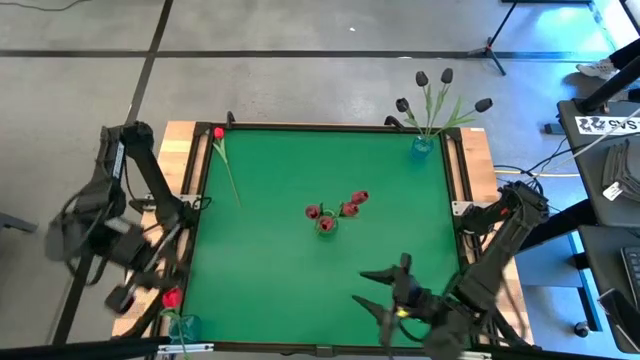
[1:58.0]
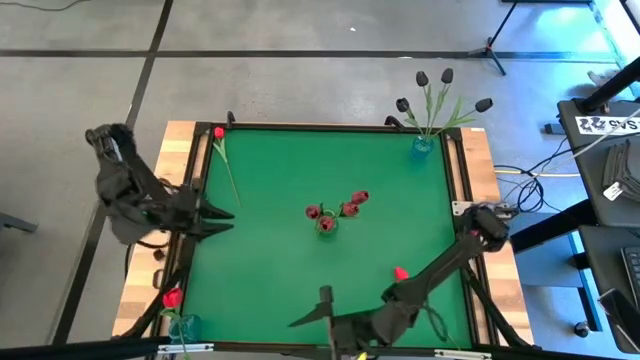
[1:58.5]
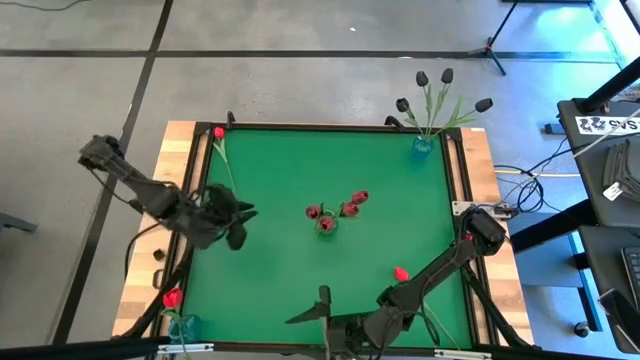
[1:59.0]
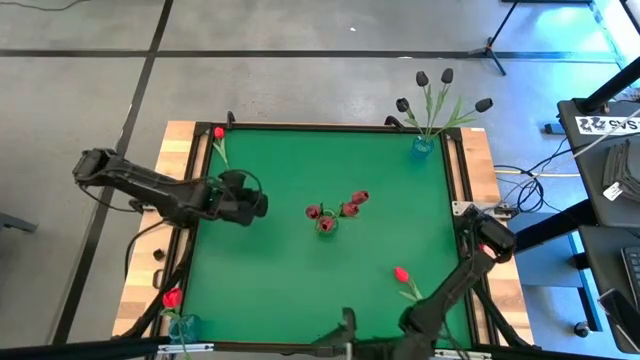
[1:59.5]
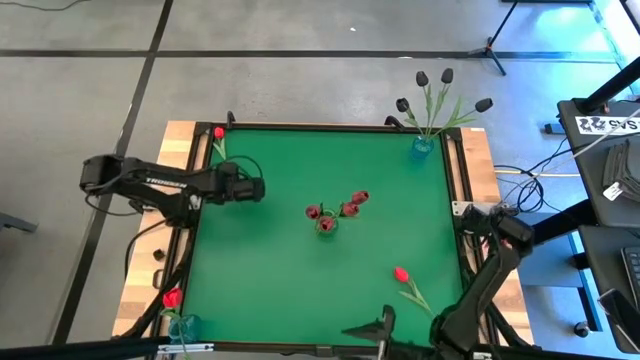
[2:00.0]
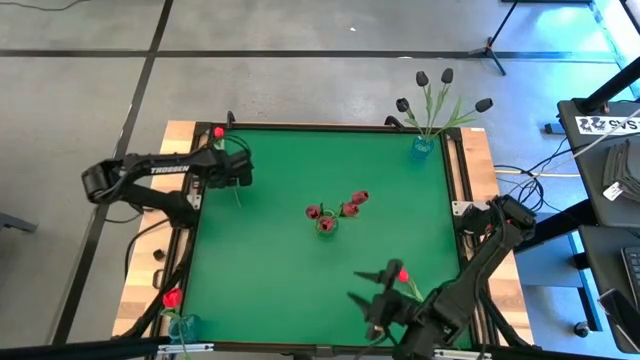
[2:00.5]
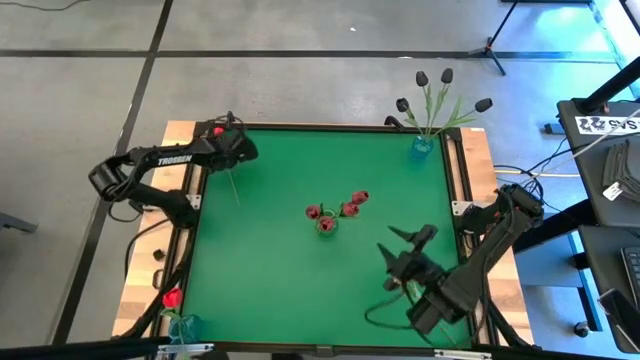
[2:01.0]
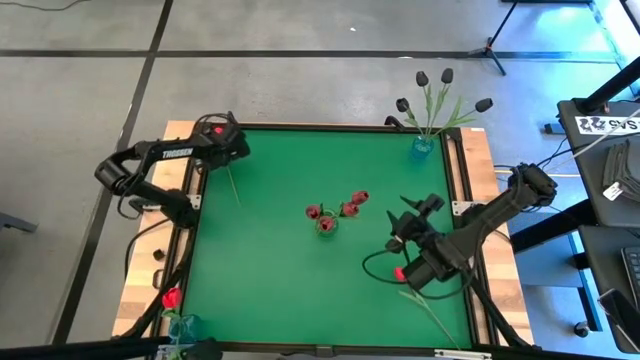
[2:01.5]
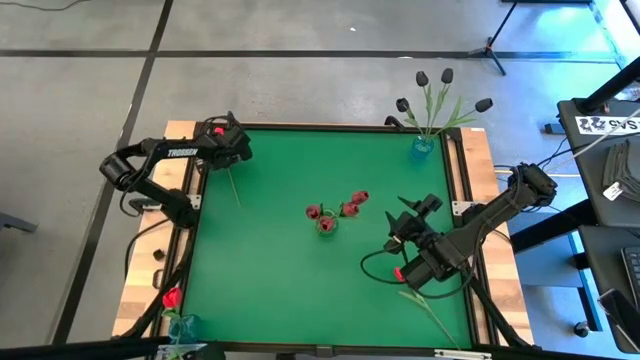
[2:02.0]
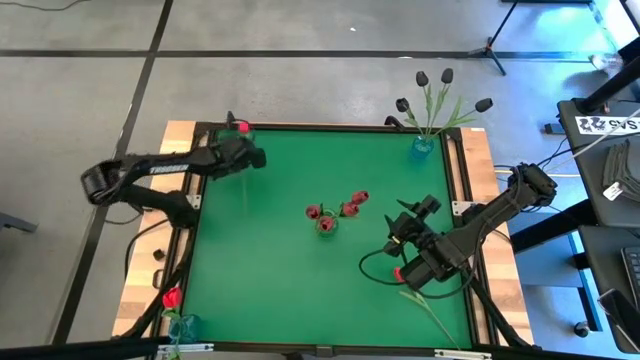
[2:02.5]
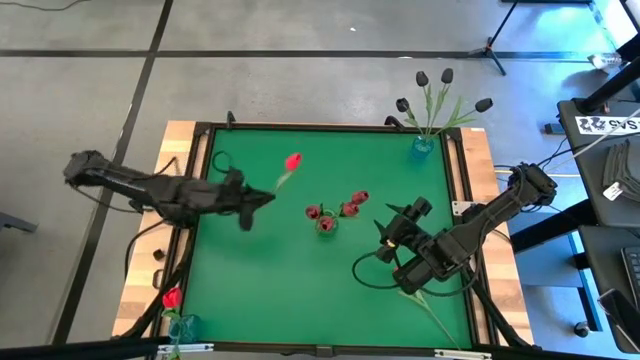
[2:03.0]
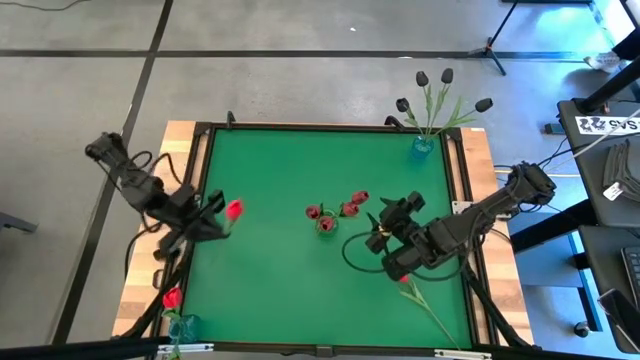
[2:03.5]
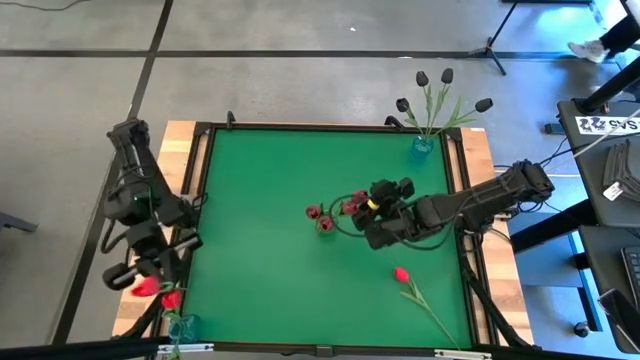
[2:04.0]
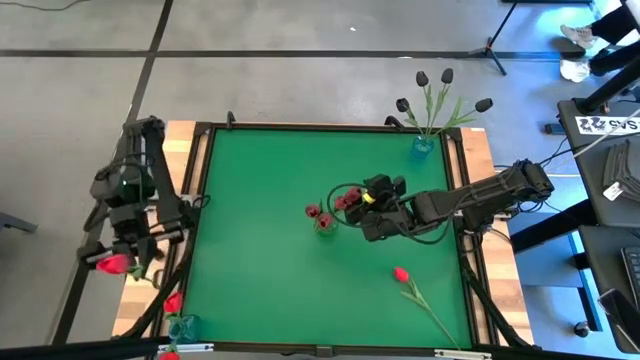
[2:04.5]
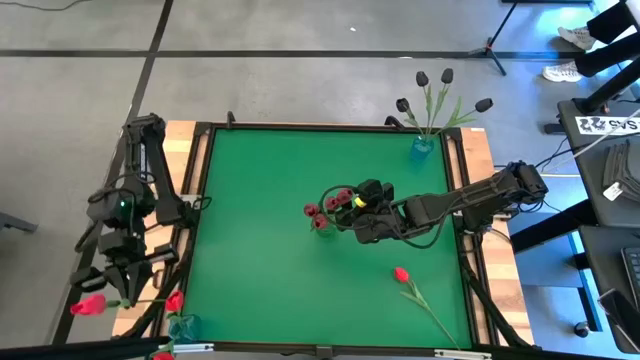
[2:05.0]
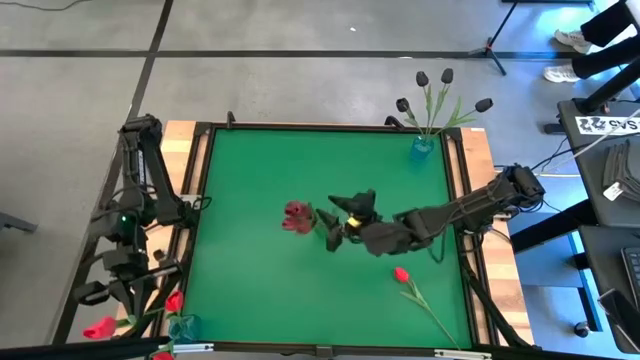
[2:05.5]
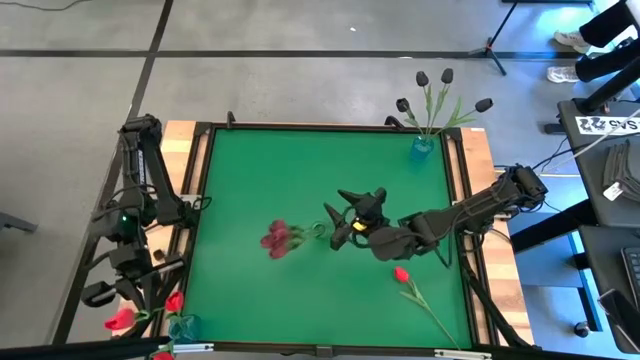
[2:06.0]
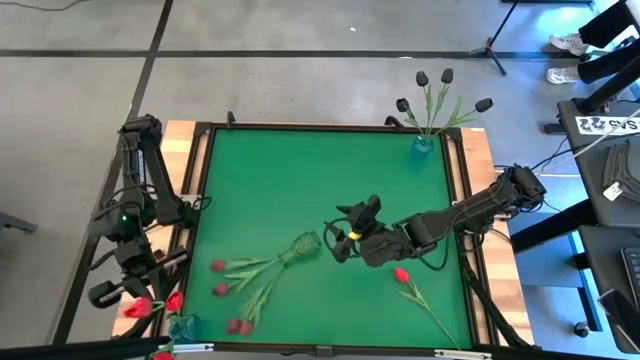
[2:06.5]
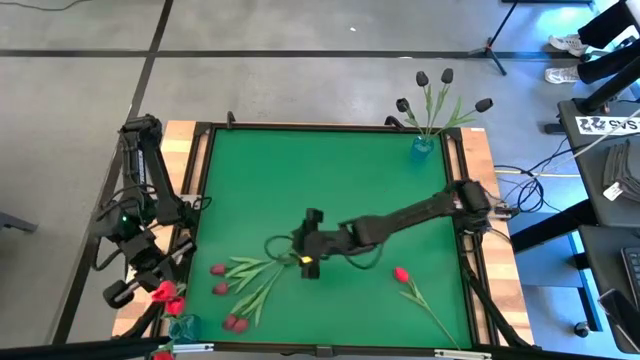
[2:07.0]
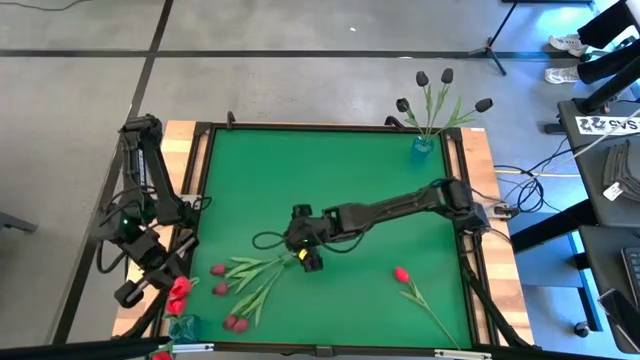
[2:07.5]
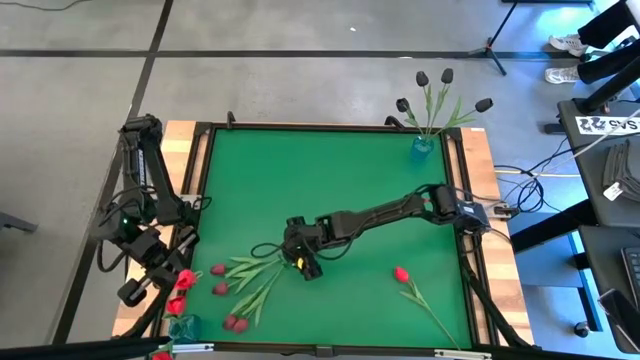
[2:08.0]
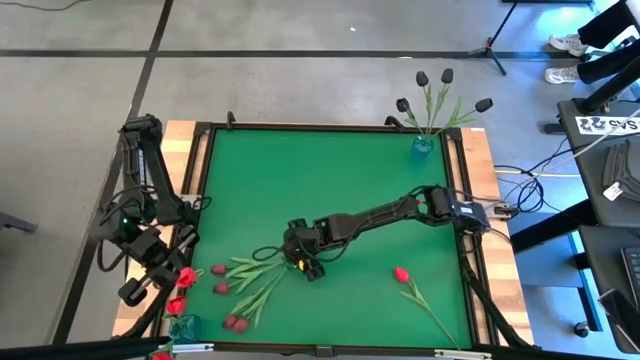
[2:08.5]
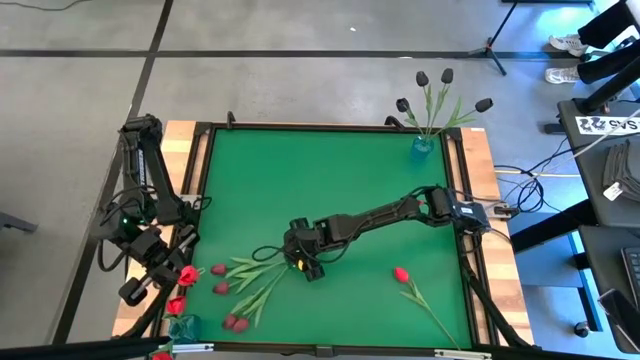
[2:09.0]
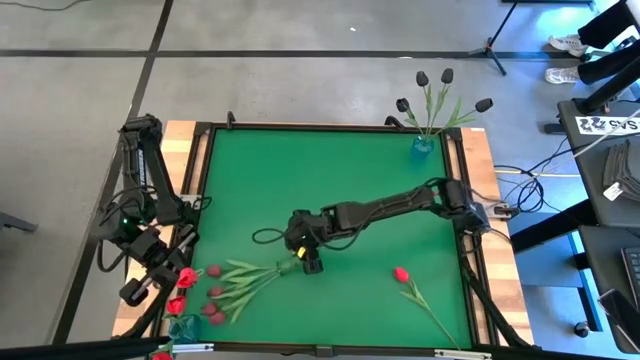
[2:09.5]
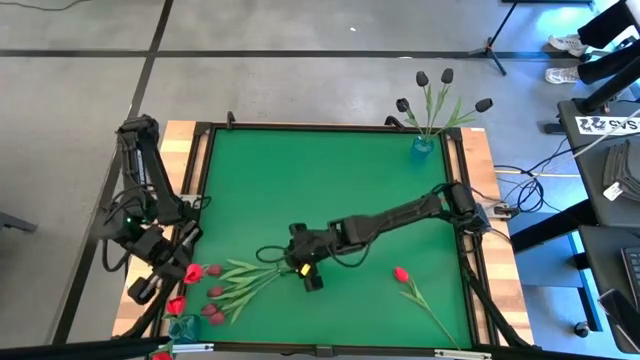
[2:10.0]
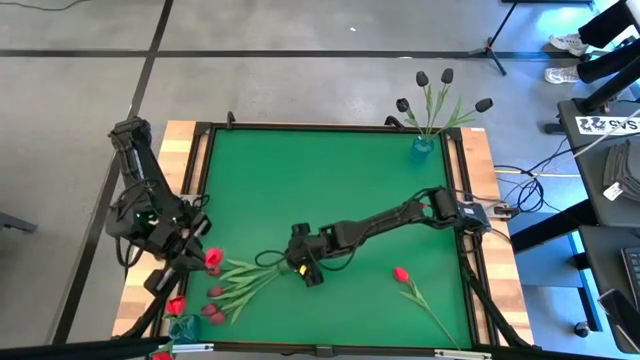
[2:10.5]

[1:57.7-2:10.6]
Task: Sort flowers into vase by color
Put the top left red flower into the bottom left blue vase

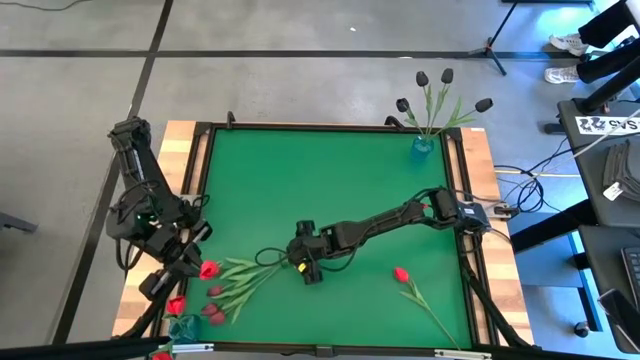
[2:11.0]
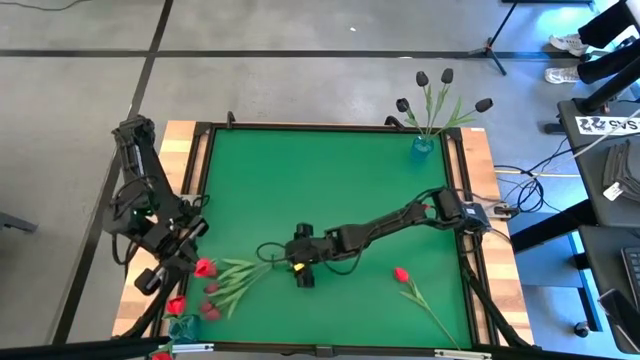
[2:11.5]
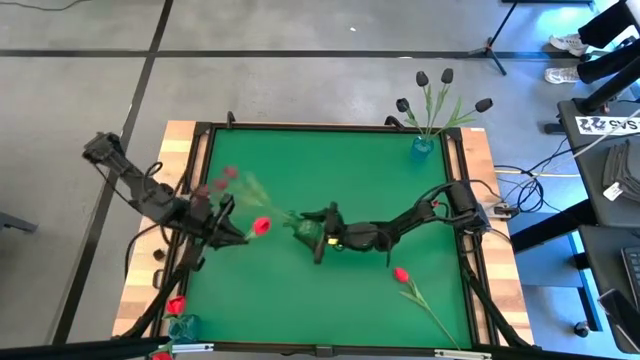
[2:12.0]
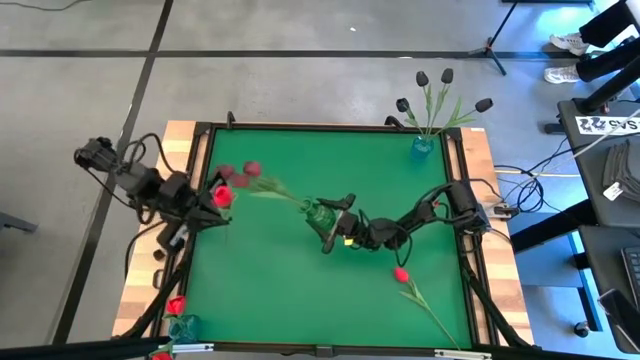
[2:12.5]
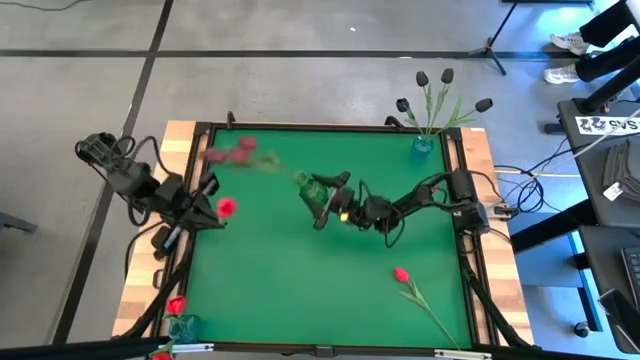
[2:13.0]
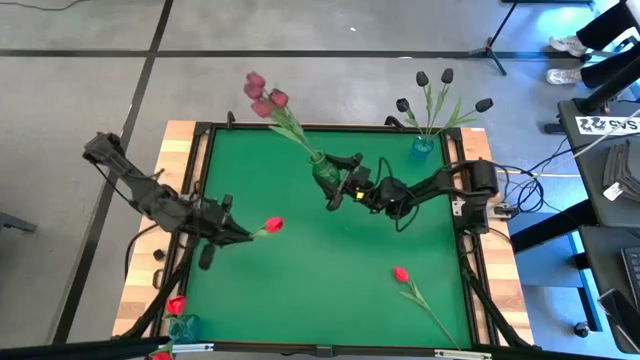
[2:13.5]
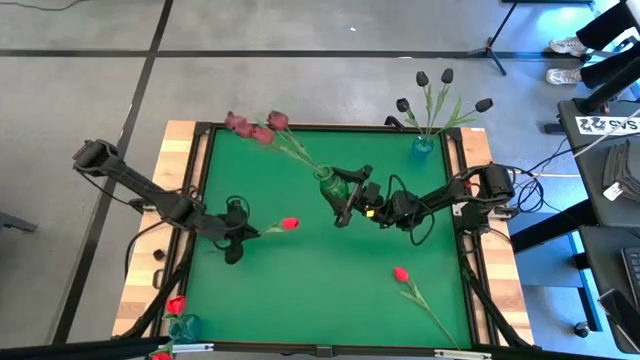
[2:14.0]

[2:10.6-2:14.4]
Put the red flower into the bottom left blue vase

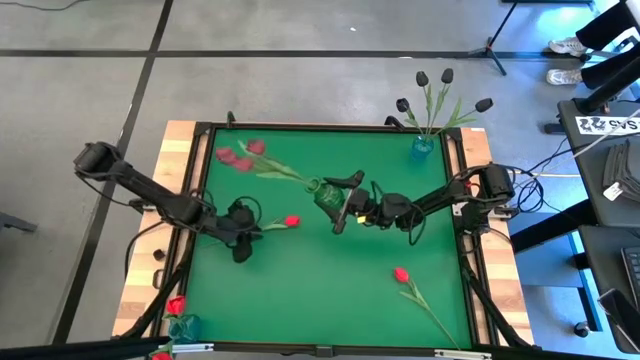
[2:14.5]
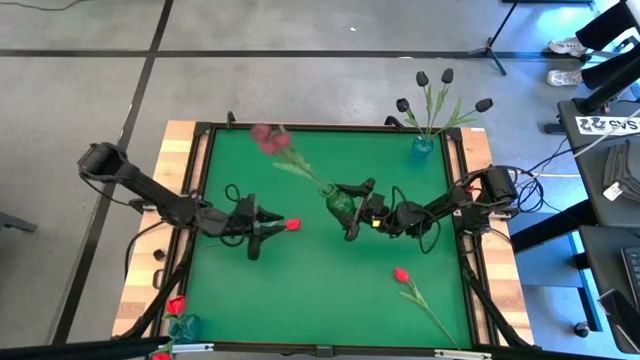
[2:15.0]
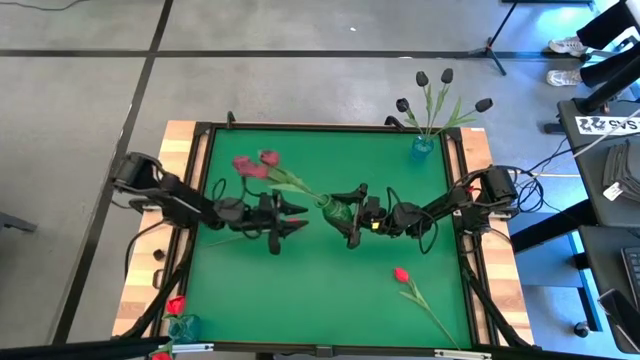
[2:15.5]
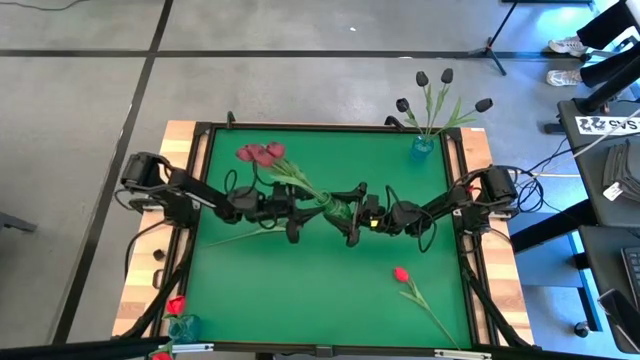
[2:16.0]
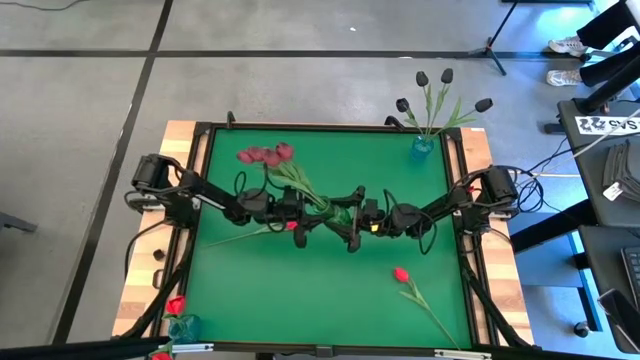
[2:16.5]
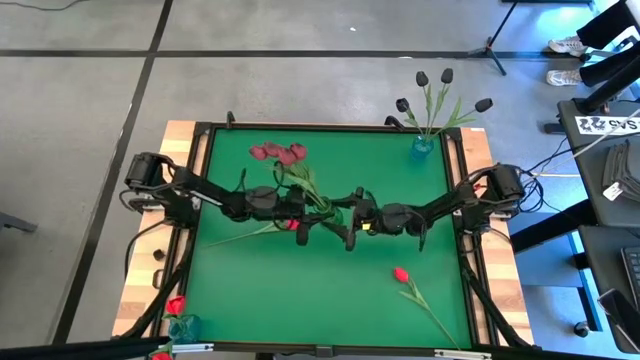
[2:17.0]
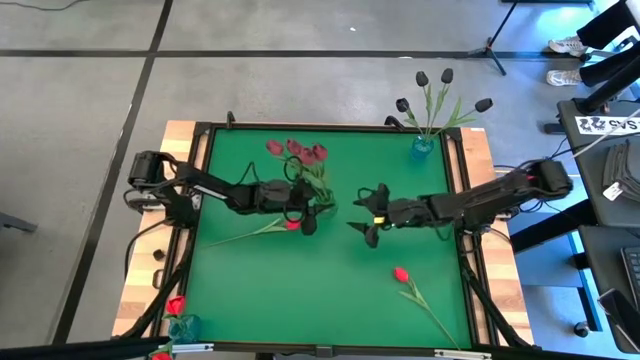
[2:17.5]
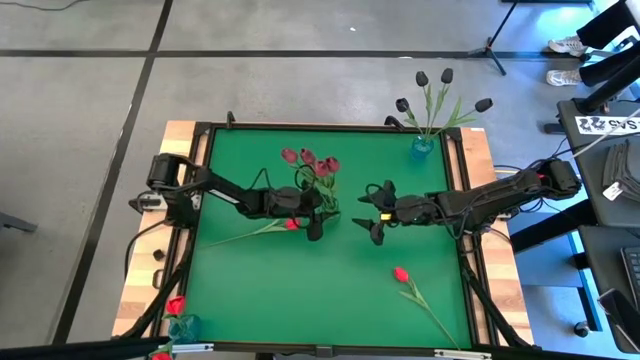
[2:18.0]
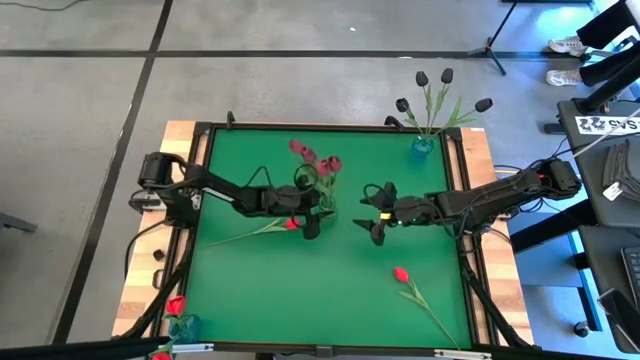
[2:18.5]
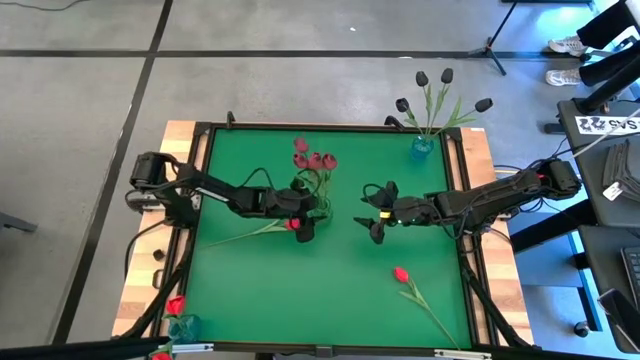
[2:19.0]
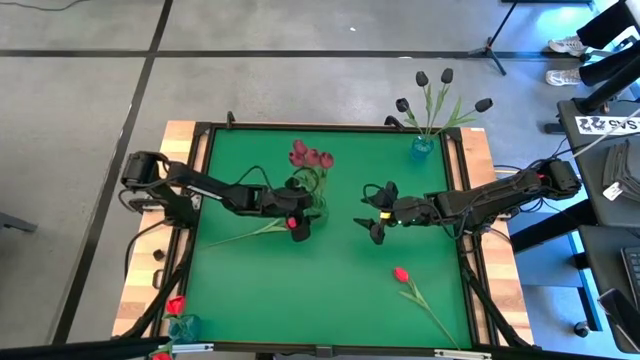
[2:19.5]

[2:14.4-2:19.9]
Adjust the green vase
